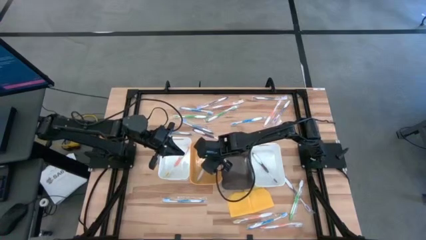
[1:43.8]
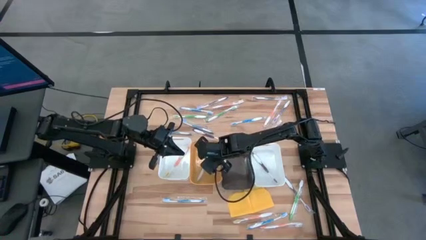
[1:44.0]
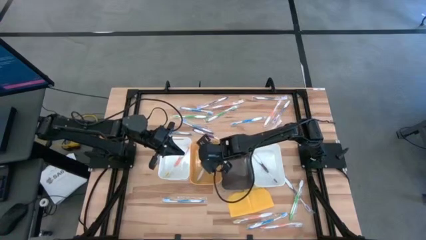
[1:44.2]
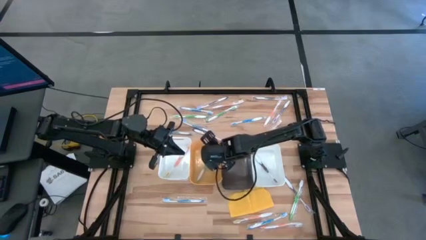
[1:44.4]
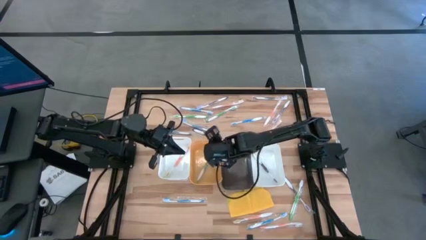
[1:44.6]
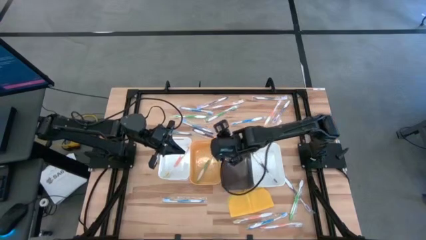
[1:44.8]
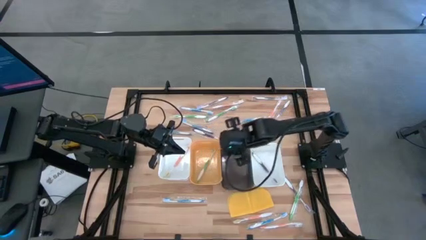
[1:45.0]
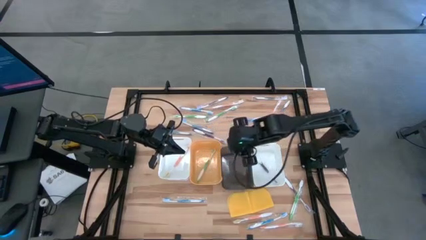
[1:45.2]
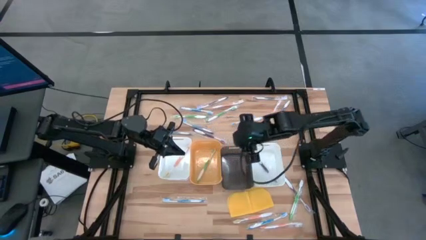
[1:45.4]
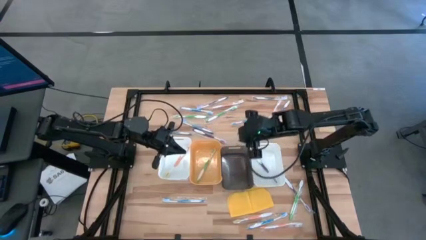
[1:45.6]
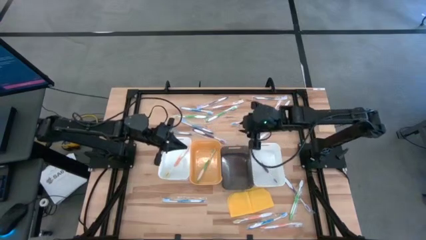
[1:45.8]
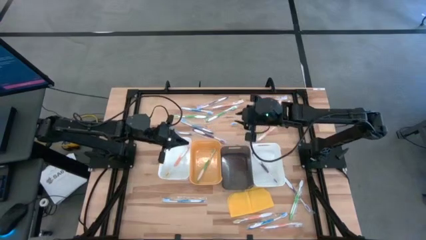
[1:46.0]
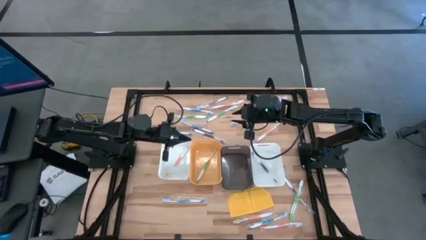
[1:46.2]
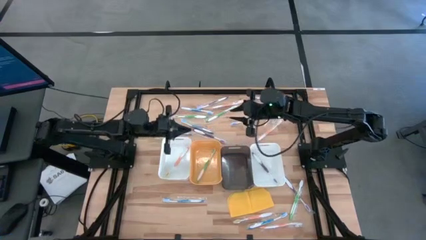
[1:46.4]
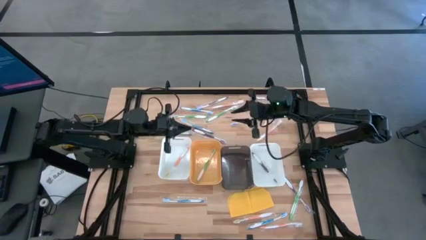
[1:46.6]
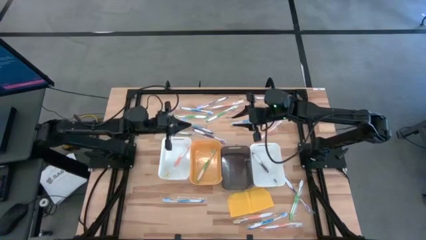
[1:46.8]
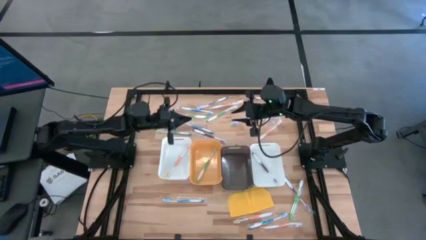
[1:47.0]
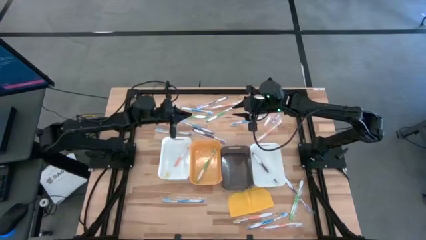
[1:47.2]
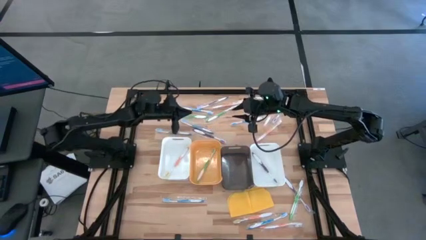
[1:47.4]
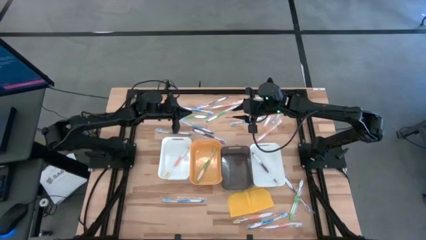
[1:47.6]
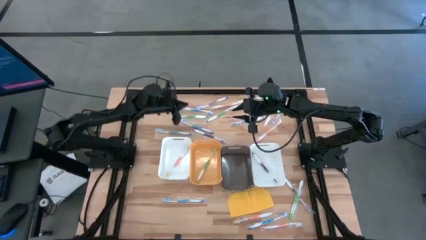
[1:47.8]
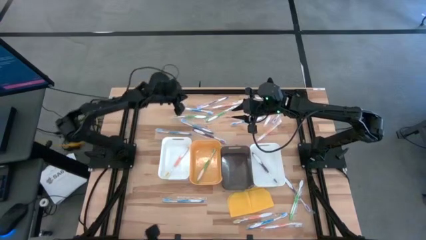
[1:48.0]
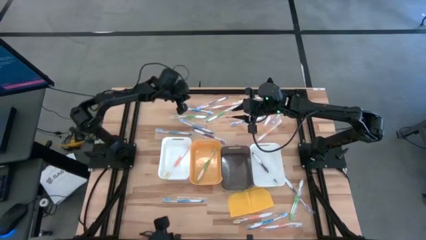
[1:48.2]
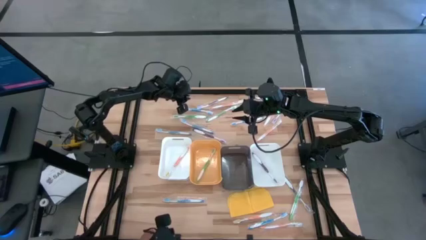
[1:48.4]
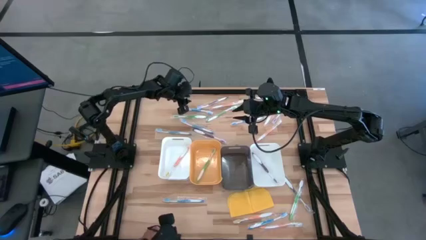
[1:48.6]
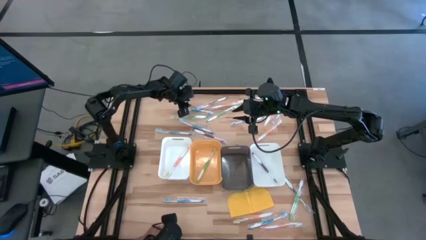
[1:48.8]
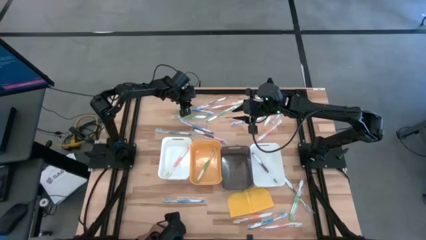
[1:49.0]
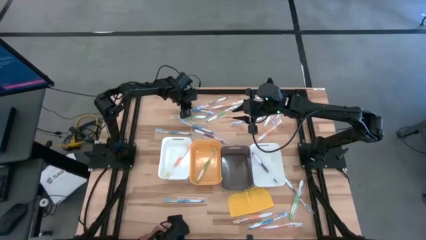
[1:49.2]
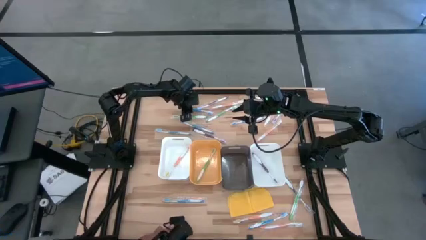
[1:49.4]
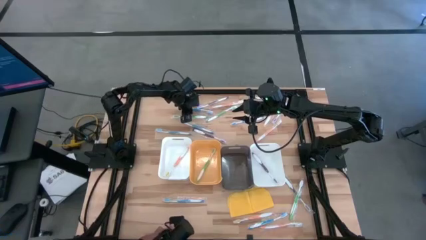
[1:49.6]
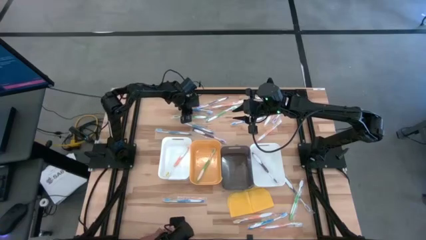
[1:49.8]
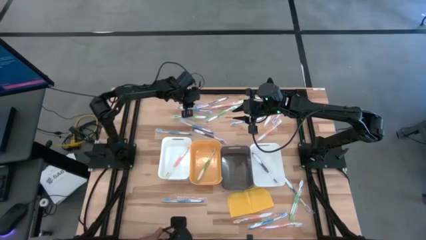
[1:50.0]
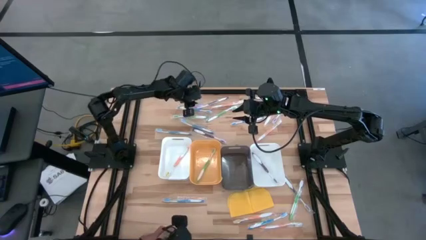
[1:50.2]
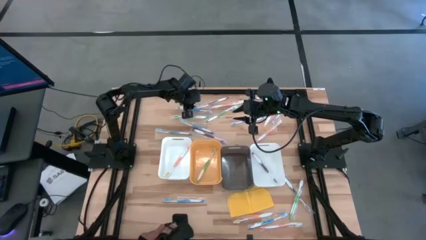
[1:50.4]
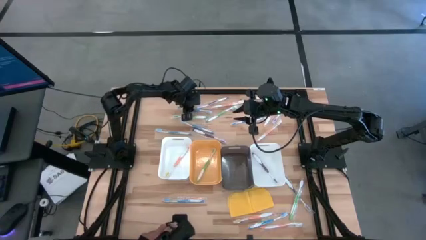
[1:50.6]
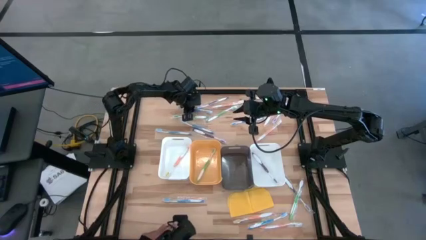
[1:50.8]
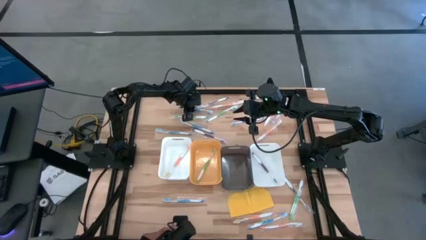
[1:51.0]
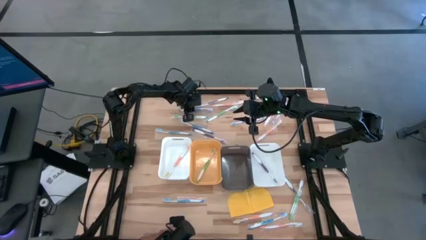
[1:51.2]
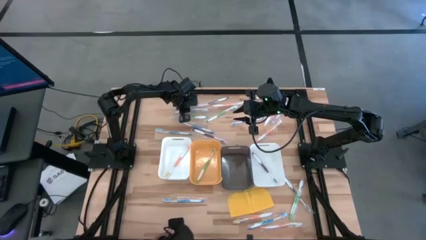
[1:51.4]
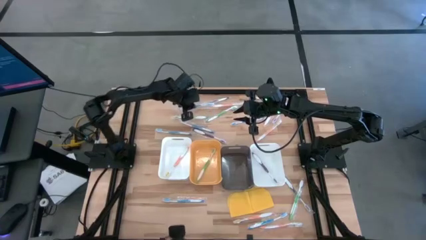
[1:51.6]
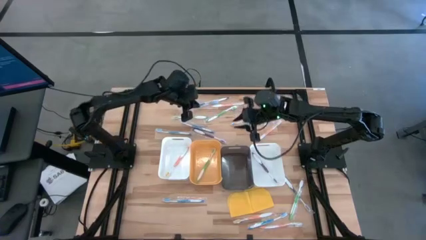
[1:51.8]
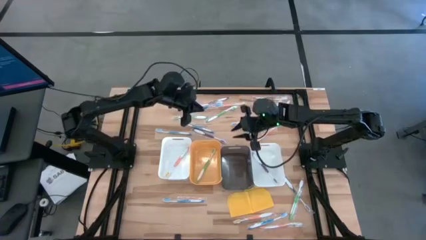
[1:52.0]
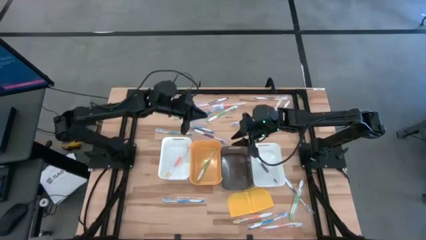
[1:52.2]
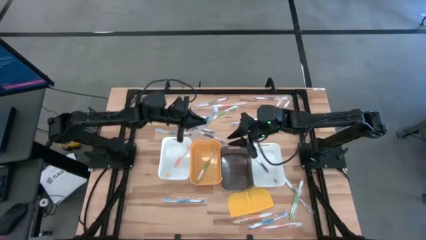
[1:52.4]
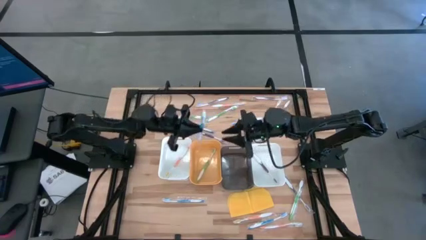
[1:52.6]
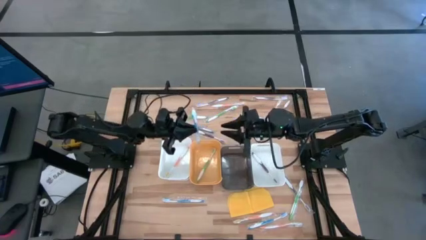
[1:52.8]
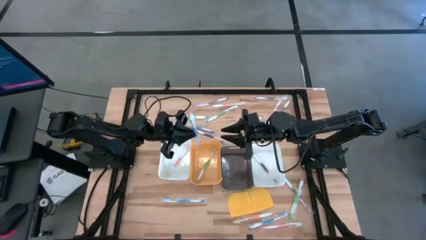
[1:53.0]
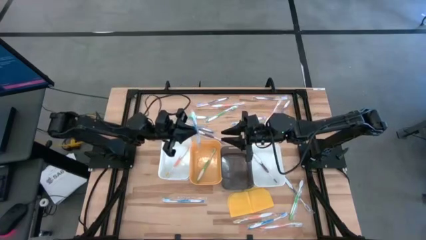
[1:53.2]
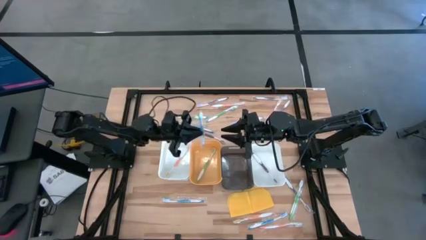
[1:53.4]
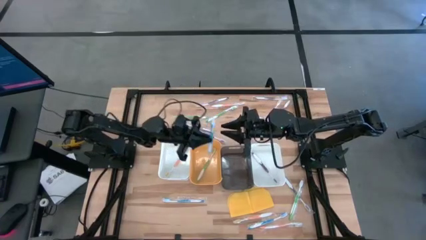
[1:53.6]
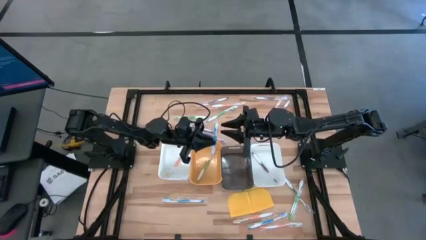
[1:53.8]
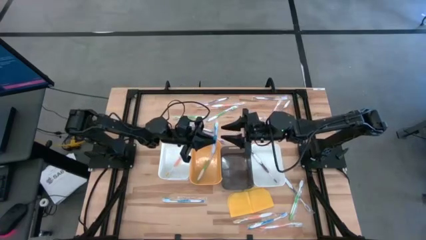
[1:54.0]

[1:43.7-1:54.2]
Task: Pick & Place Toothbrushes
Put the blue toothbrush into the black bin

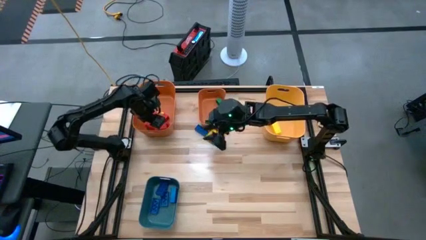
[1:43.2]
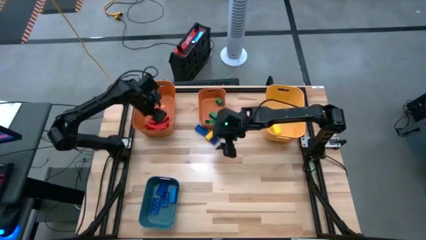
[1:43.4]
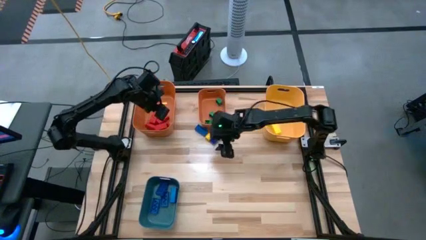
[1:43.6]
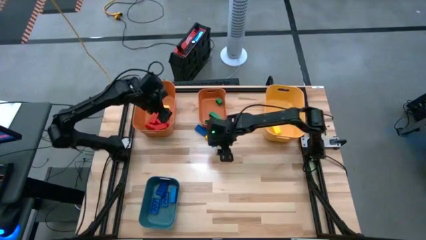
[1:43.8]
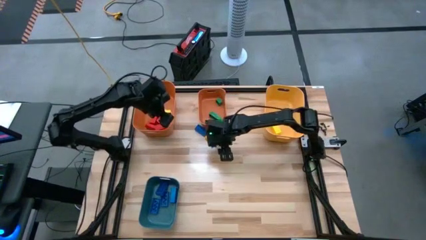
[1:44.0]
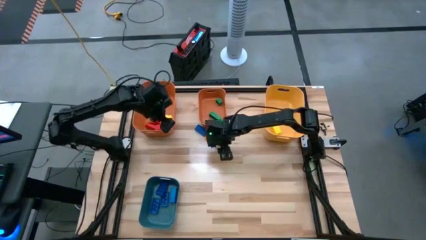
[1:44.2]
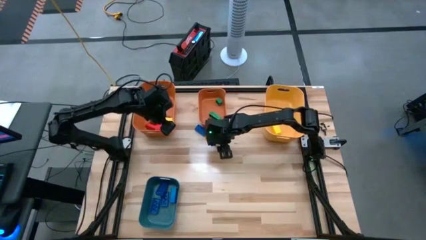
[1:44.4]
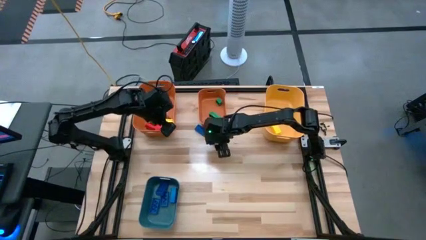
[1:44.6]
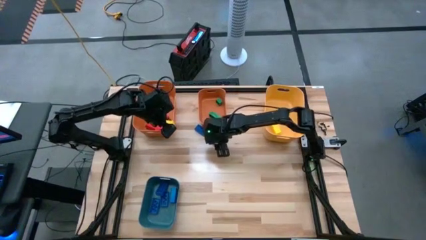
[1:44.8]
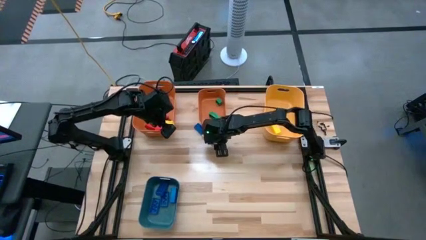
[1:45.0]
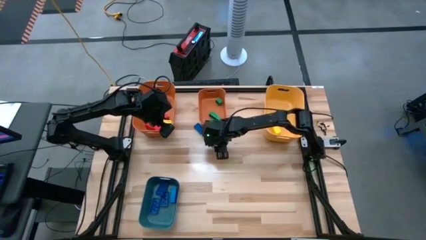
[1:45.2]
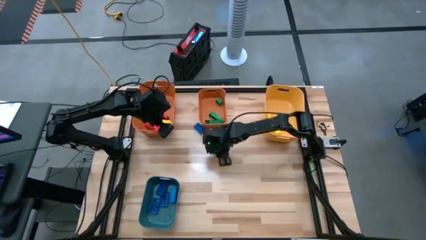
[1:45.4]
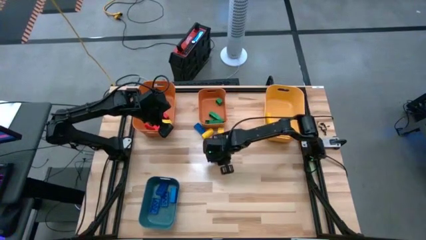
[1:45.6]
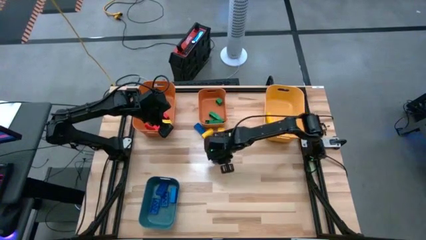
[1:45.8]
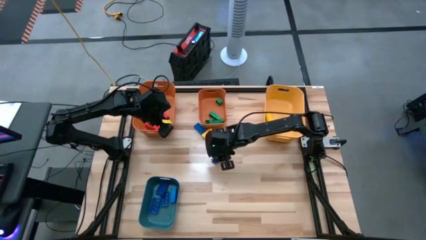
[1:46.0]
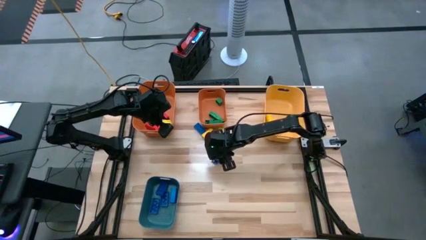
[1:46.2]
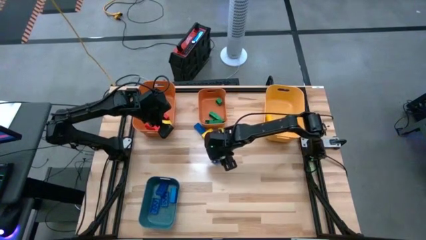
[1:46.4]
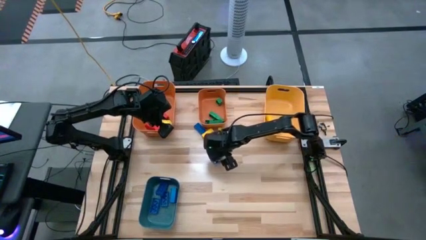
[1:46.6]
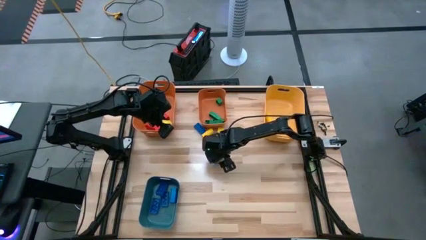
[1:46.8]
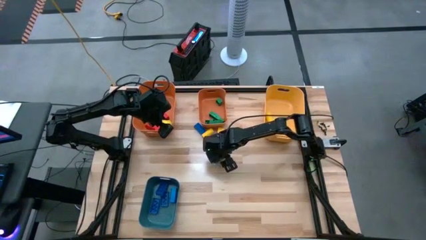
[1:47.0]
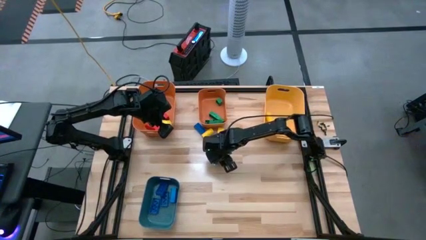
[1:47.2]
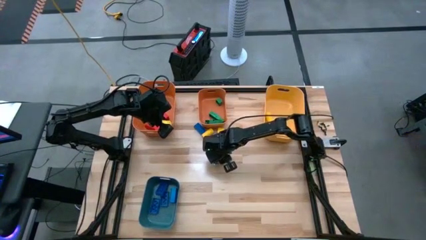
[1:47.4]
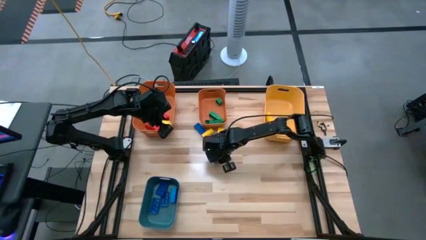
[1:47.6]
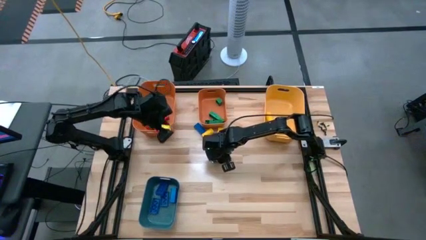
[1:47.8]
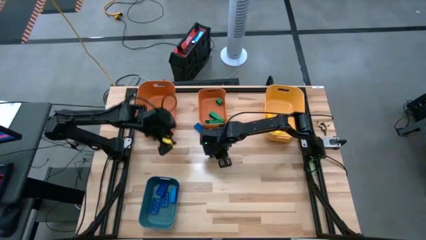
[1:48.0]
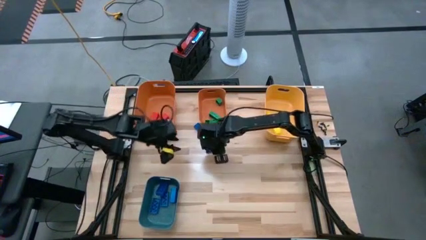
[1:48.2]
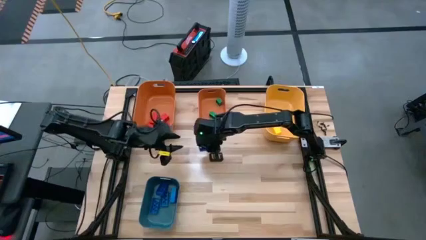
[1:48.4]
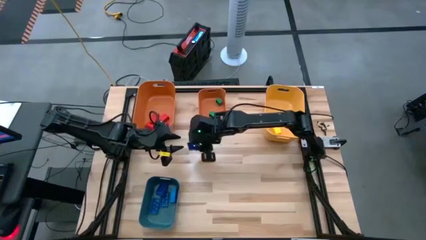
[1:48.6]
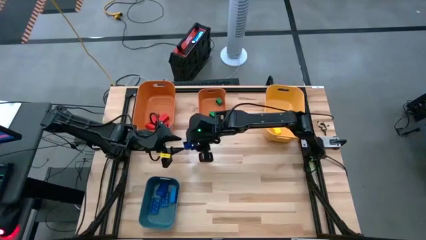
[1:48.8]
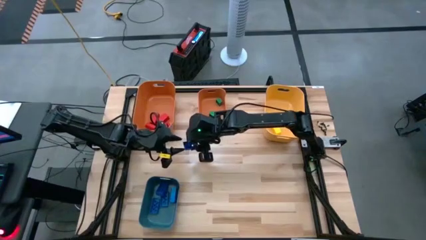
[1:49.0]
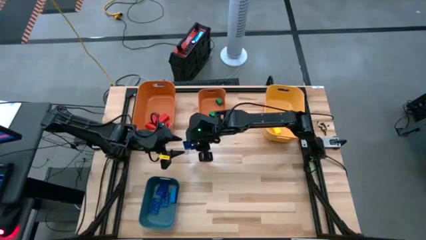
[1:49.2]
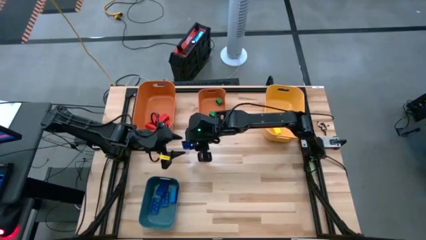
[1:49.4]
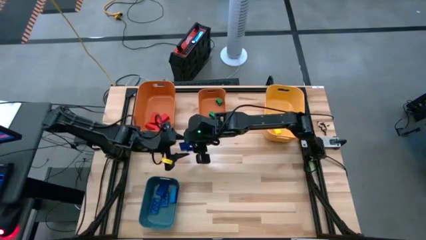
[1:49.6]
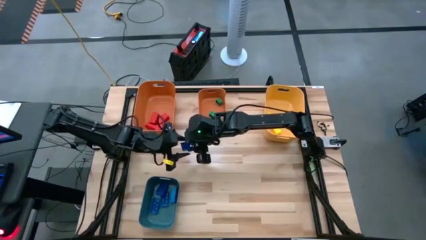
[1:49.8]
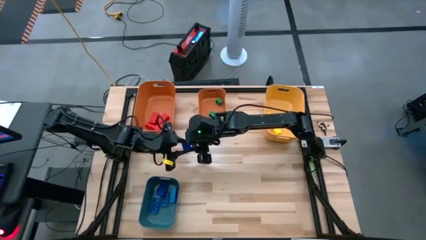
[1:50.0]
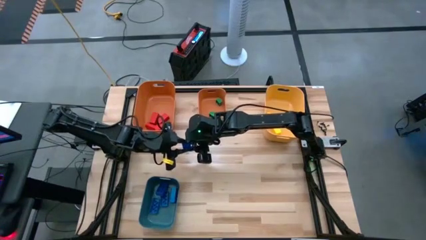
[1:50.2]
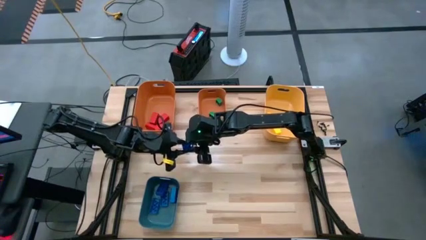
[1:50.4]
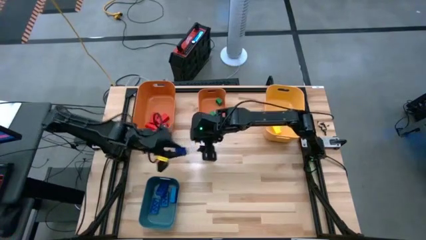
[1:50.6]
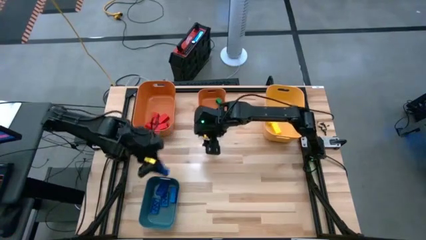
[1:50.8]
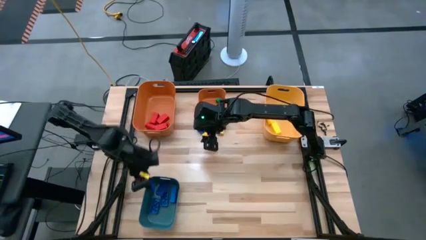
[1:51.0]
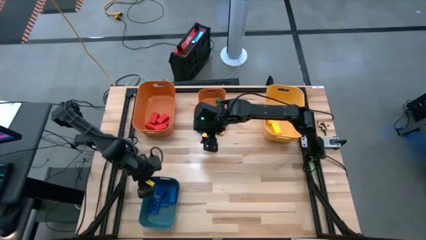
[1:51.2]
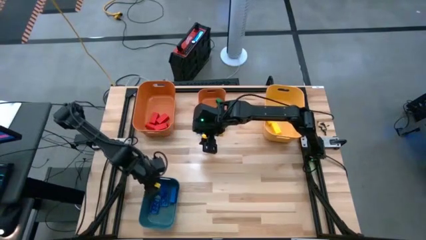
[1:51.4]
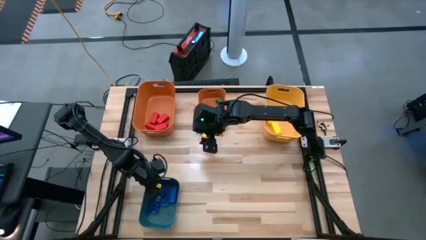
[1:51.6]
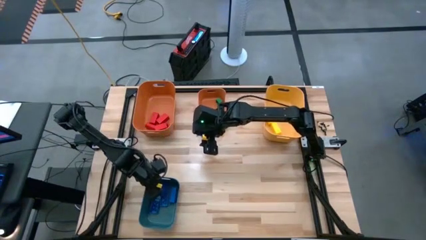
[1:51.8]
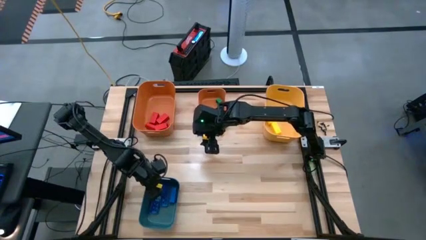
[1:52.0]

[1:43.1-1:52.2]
Task: Sort blocks
Put the blue game piece into the blue bin
